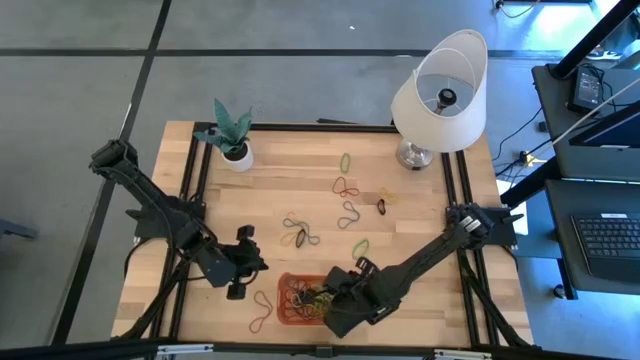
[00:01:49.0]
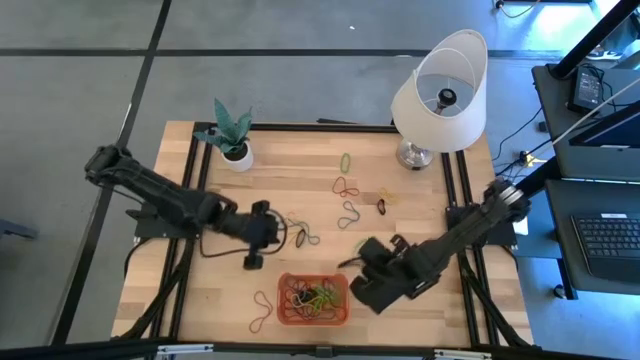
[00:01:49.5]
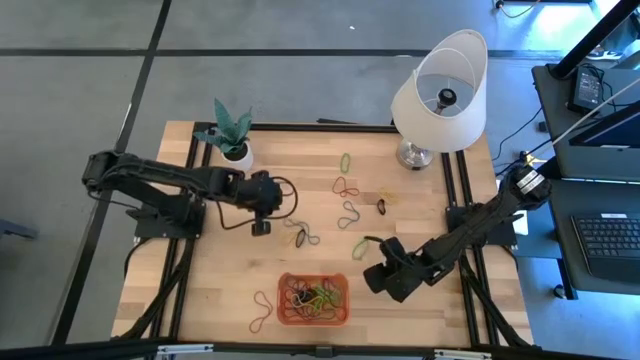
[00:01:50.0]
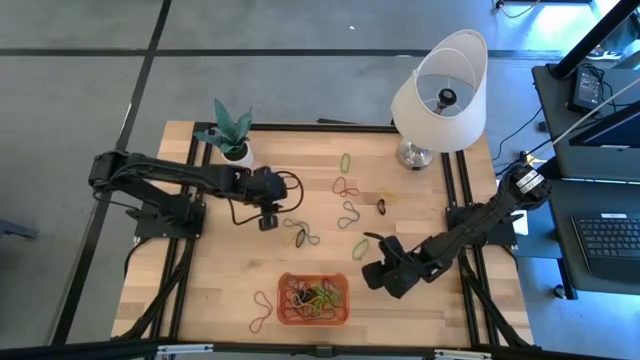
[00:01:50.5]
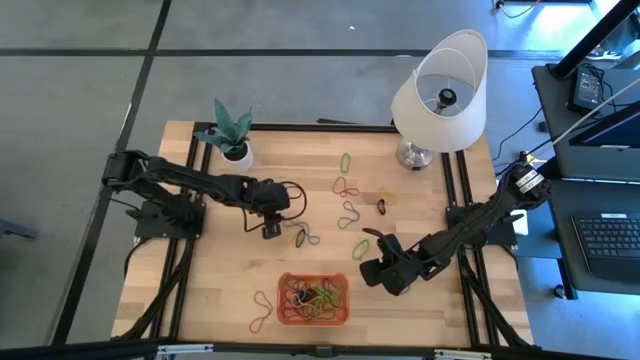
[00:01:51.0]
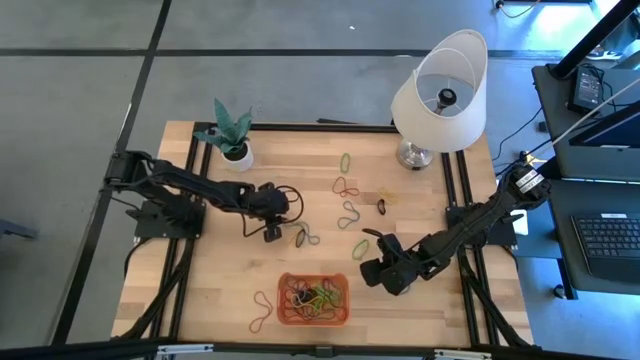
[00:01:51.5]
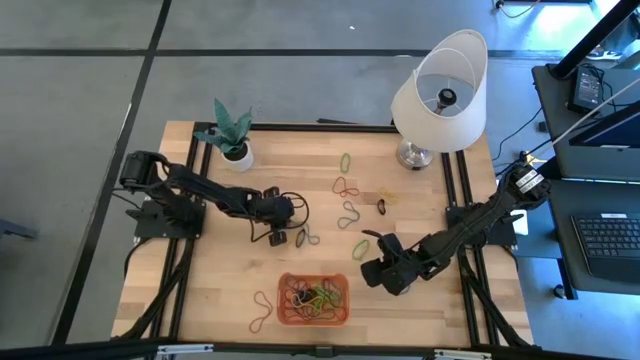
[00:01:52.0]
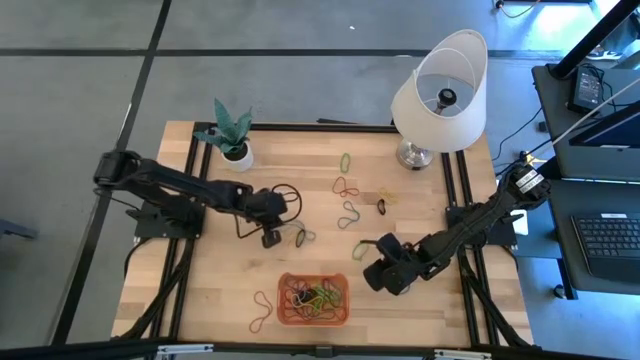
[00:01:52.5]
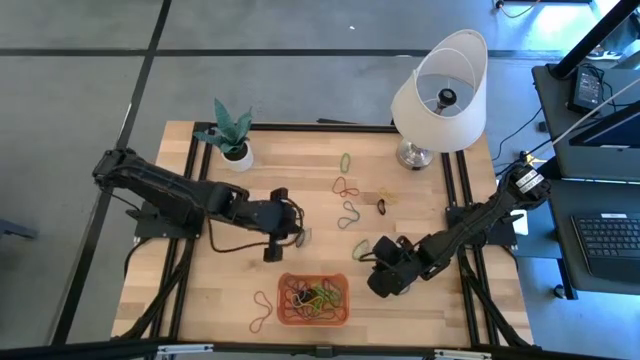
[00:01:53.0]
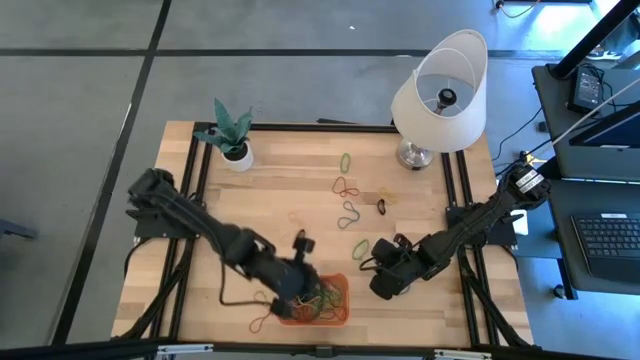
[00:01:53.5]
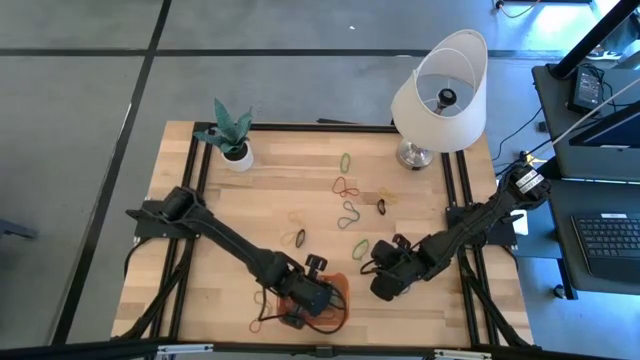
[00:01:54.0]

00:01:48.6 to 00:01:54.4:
Task: Pick and place rubber bands into bin
Put the left blue rubber band into the bin

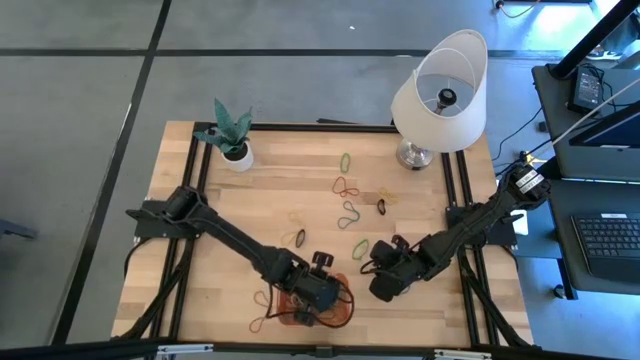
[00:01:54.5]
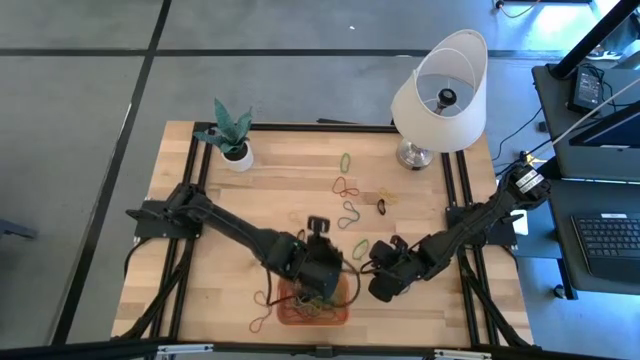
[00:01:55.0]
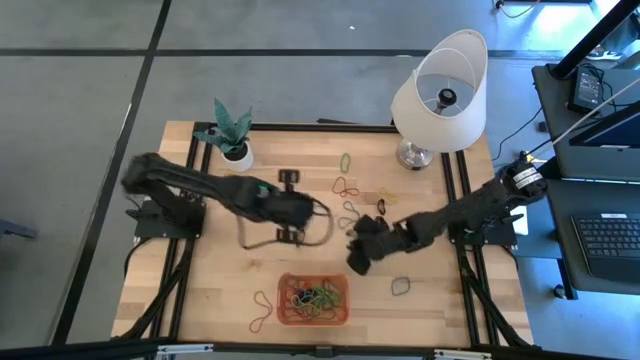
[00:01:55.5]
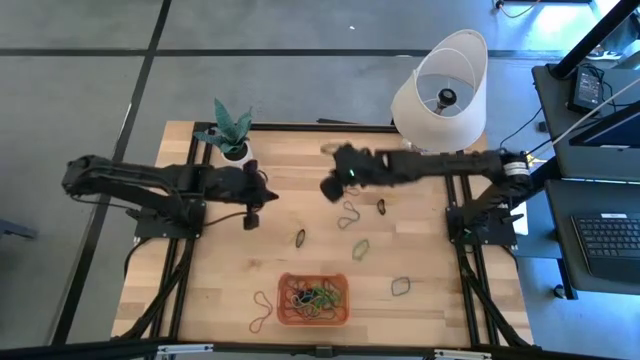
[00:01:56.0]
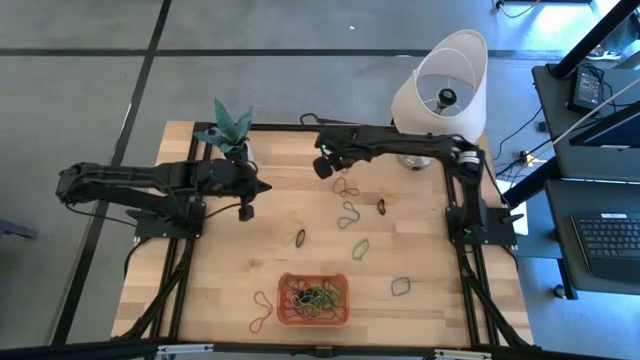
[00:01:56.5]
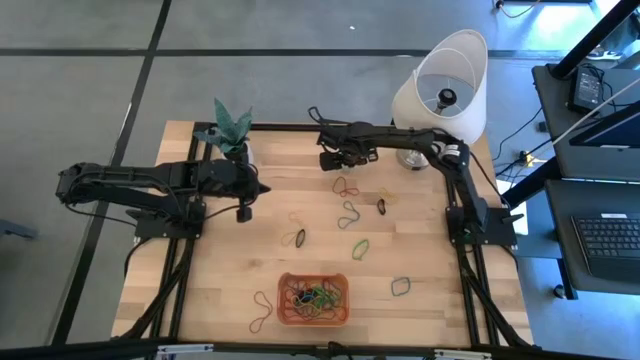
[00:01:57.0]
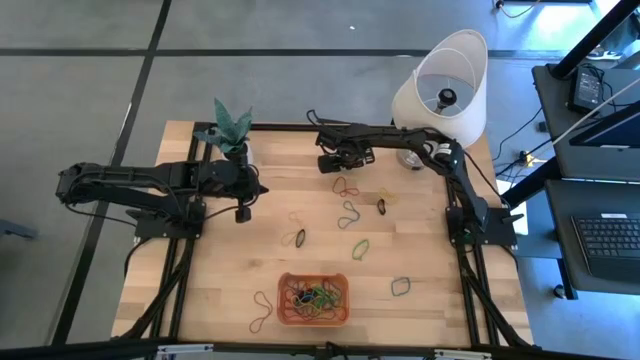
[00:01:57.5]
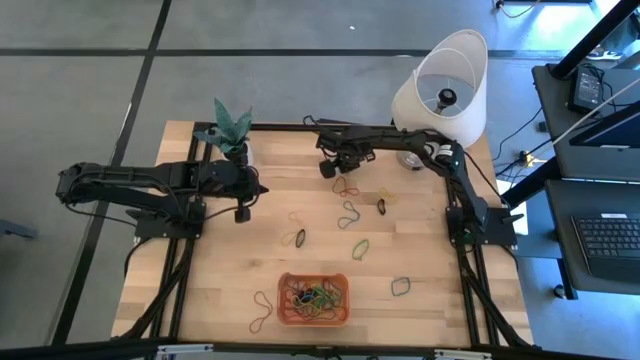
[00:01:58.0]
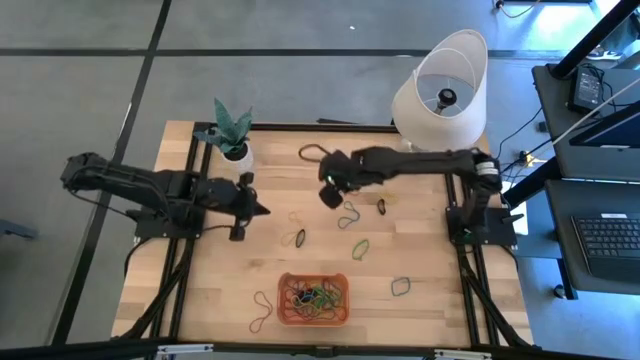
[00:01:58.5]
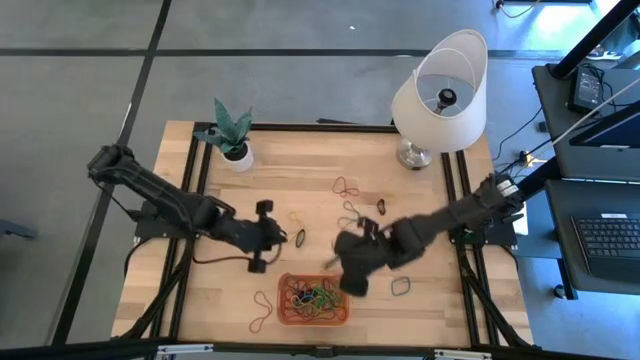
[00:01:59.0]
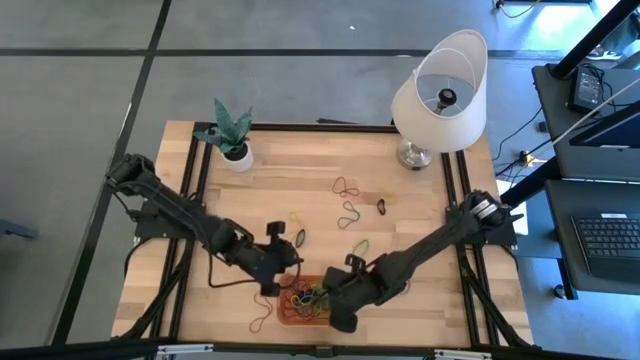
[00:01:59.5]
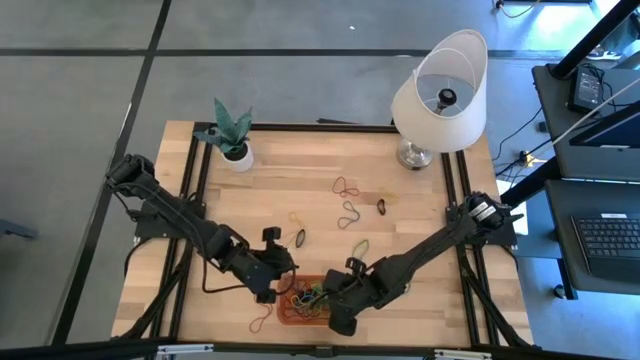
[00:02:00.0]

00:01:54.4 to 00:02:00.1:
Put the top green rubber band into the bin

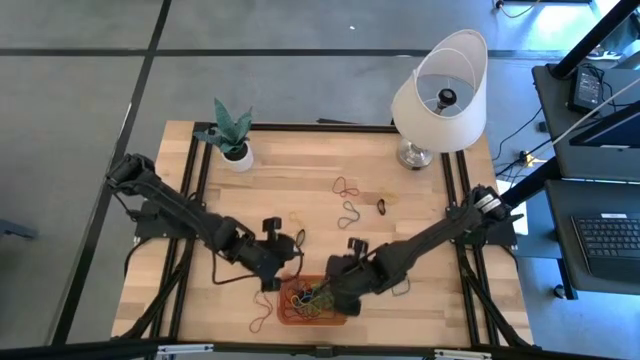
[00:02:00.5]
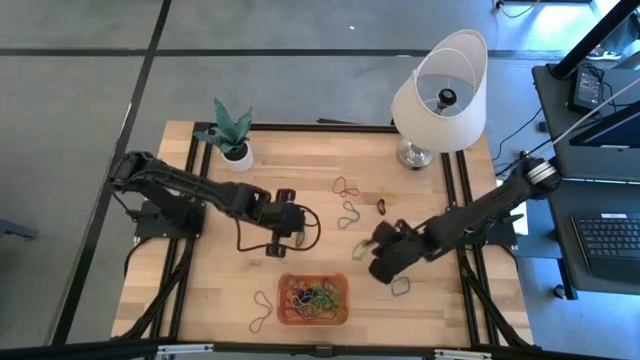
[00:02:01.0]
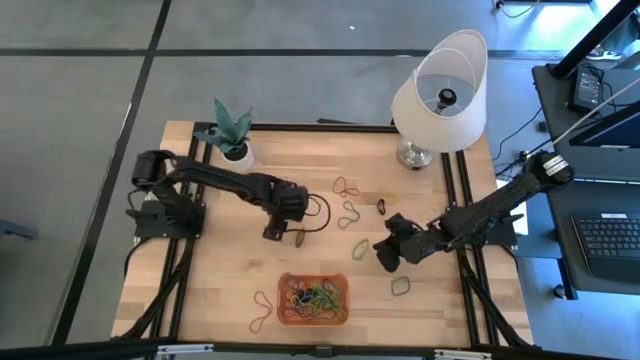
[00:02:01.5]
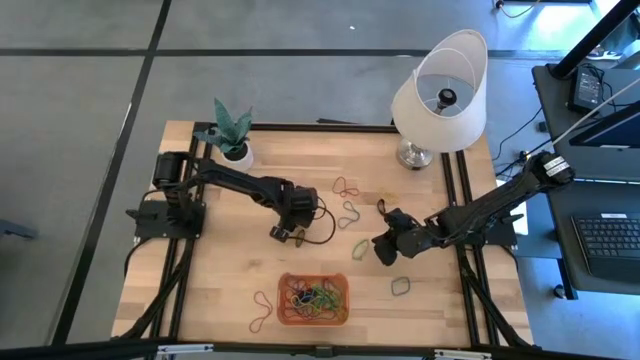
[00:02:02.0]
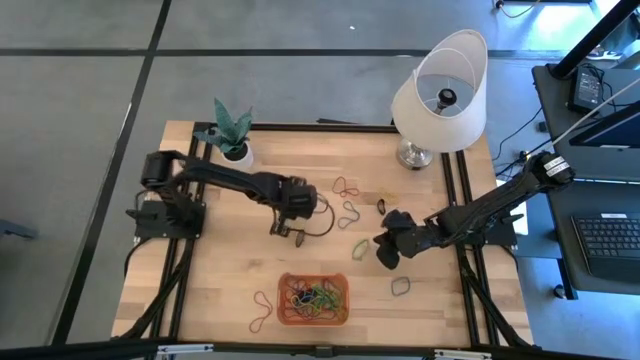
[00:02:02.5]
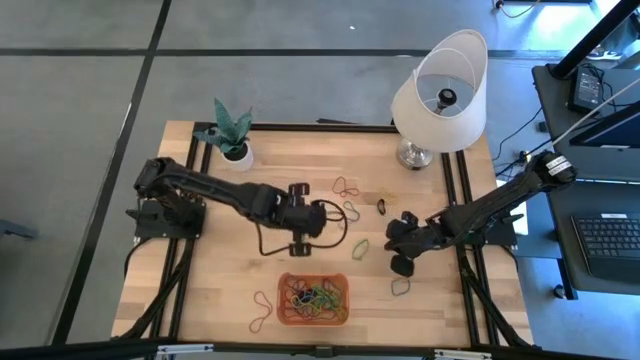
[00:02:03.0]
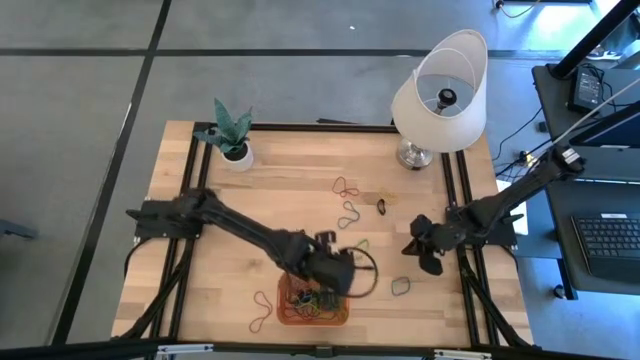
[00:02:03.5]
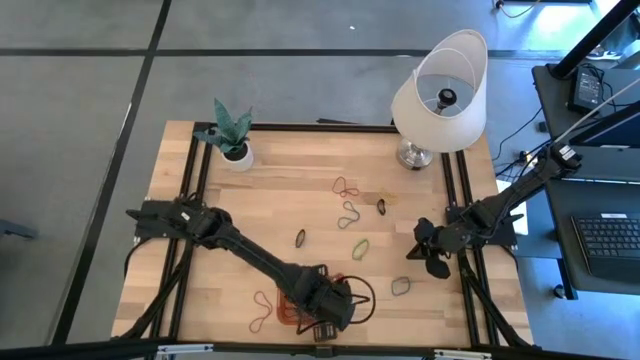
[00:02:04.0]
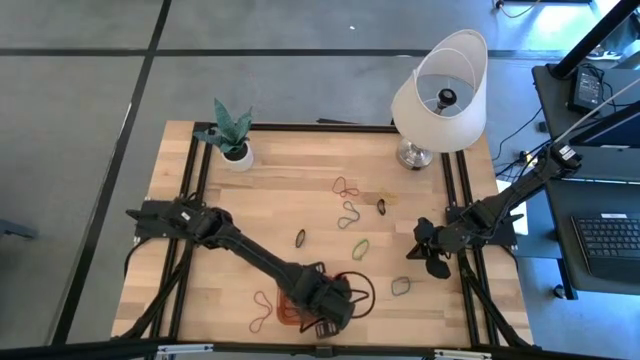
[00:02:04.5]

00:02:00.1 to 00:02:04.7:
Put the left yellow rubber band into the bin

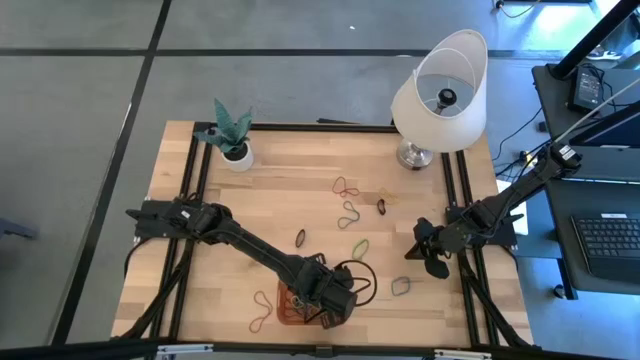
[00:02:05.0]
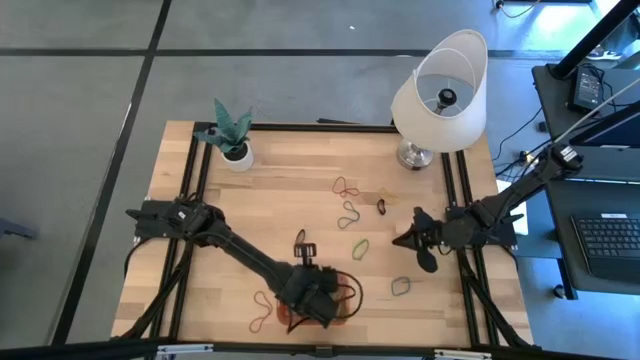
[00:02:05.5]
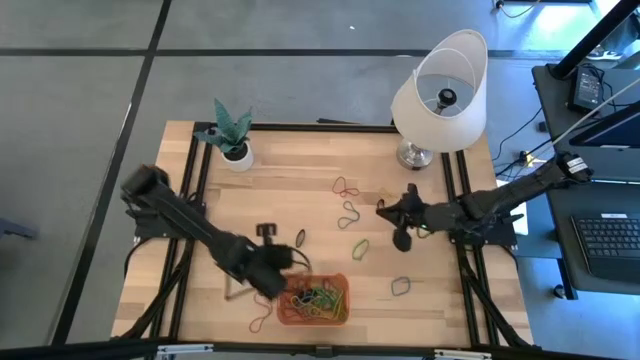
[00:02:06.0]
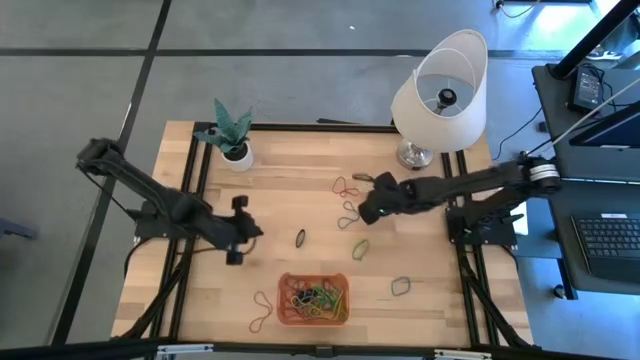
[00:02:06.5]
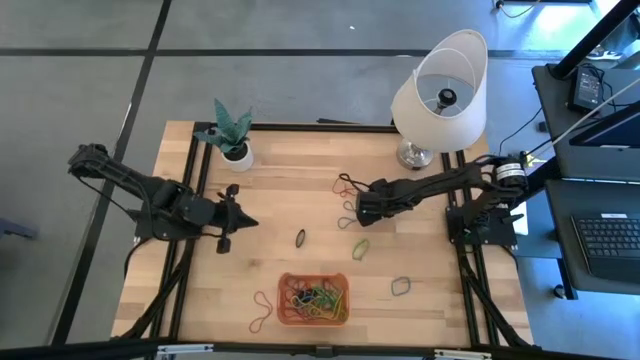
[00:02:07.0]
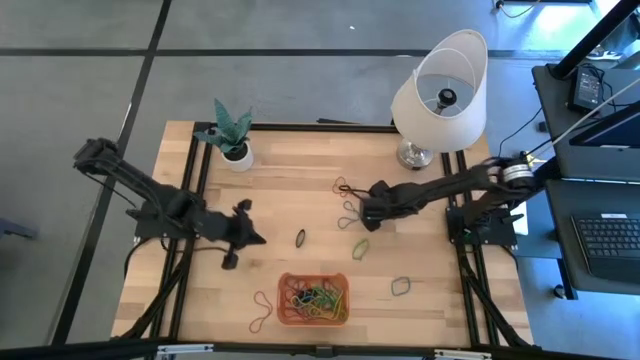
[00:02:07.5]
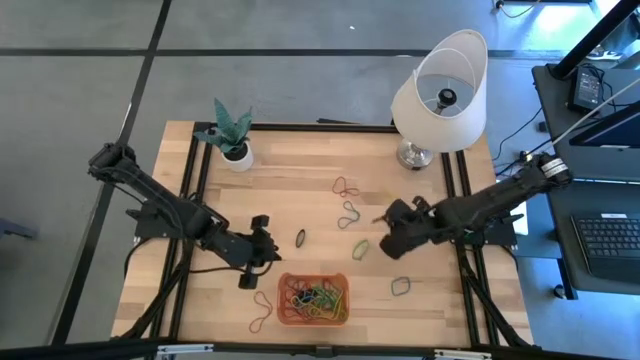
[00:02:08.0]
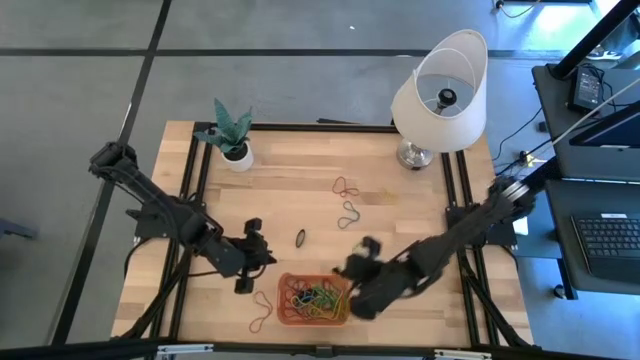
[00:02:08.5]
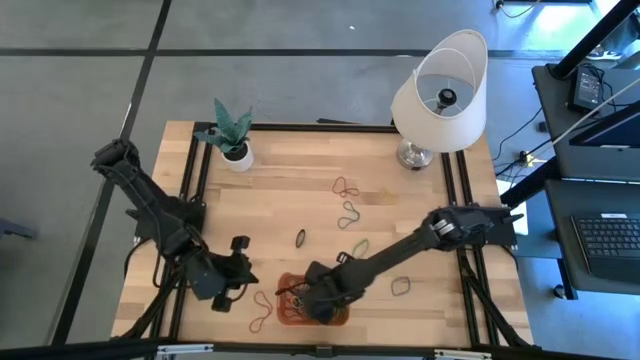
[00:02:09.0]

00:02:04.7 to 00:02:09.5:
Put the right black rubber band into the bin
